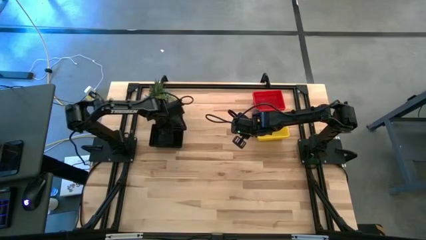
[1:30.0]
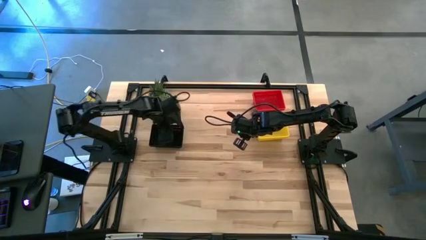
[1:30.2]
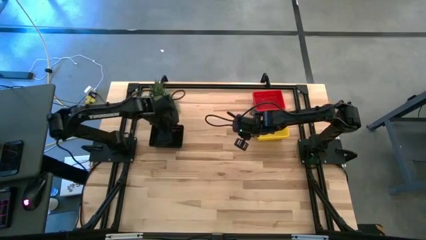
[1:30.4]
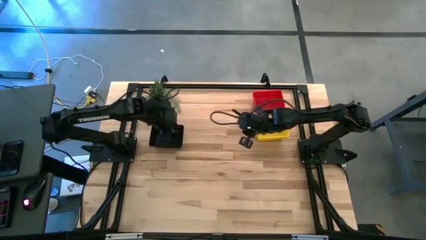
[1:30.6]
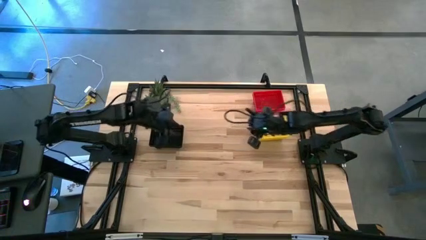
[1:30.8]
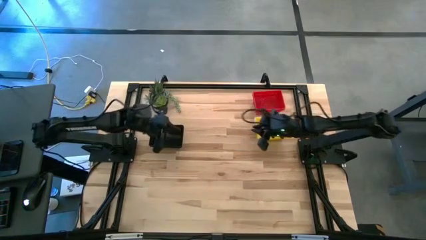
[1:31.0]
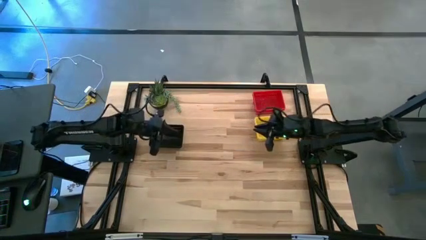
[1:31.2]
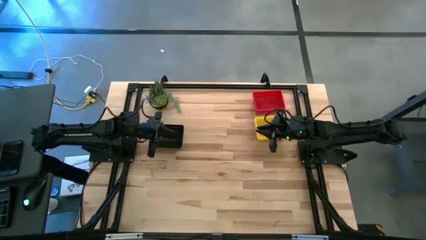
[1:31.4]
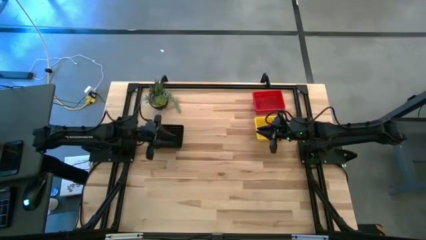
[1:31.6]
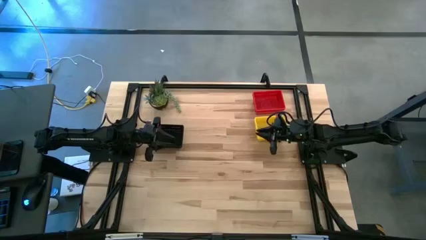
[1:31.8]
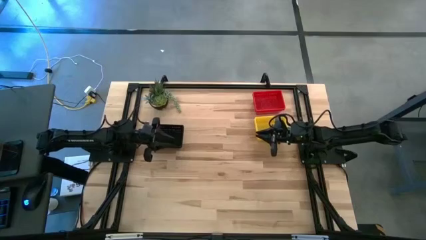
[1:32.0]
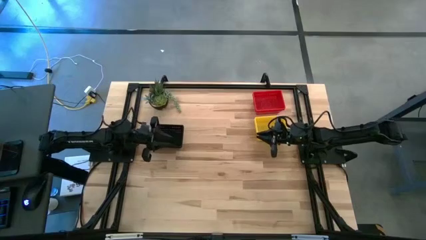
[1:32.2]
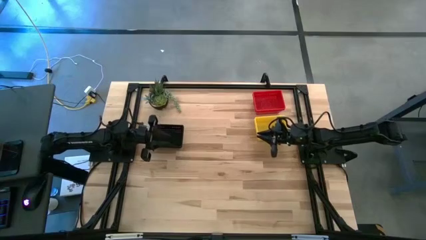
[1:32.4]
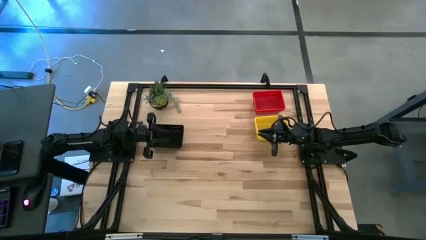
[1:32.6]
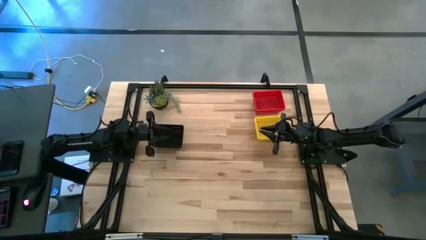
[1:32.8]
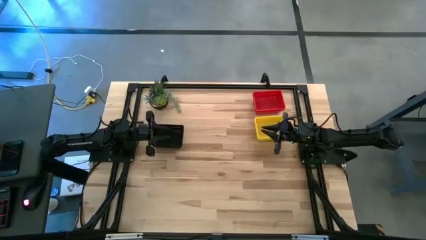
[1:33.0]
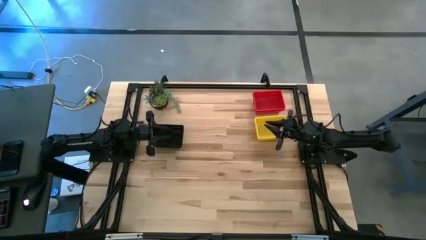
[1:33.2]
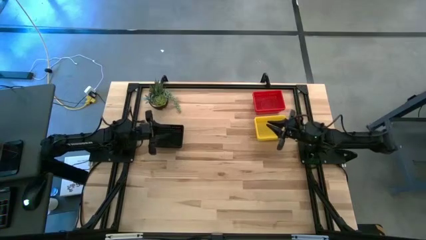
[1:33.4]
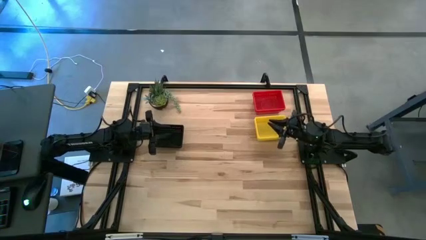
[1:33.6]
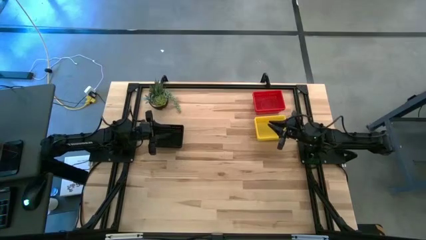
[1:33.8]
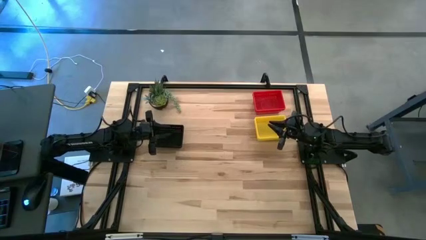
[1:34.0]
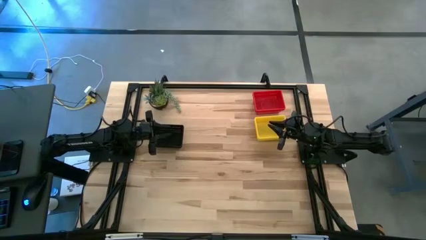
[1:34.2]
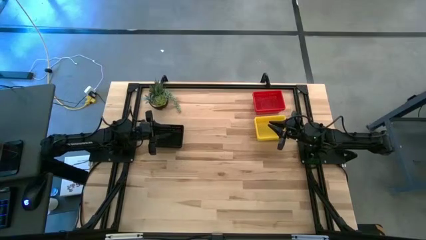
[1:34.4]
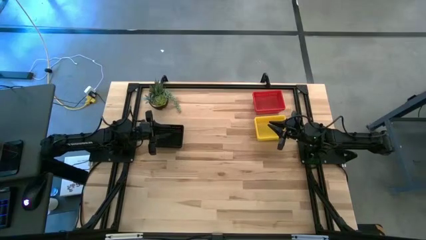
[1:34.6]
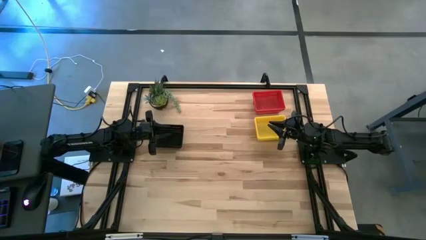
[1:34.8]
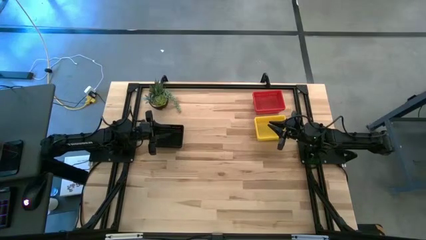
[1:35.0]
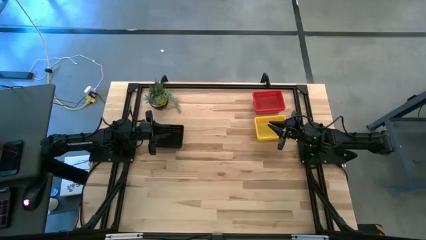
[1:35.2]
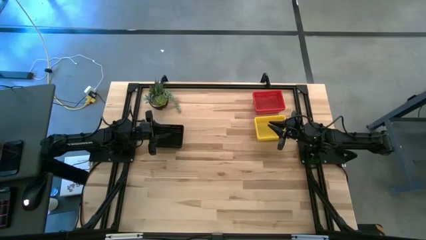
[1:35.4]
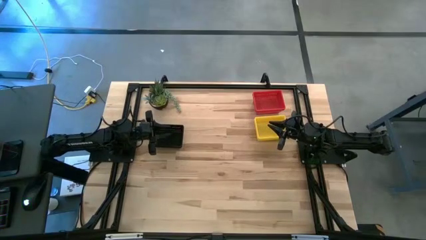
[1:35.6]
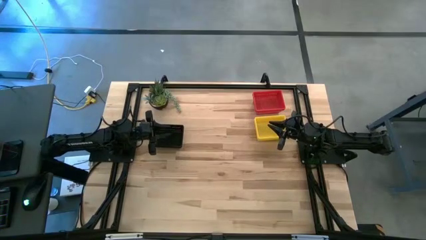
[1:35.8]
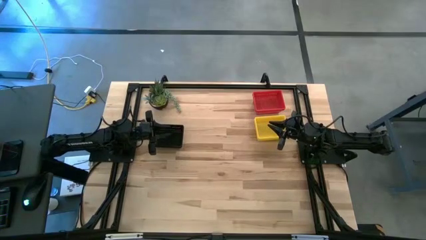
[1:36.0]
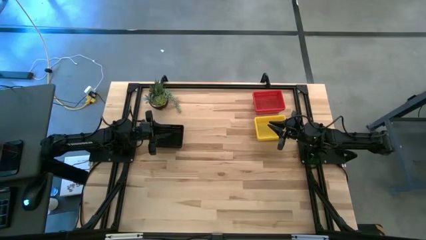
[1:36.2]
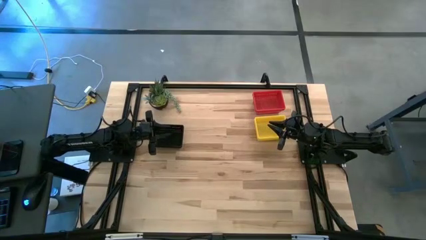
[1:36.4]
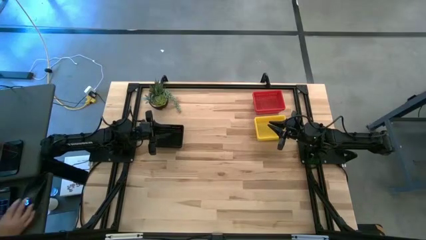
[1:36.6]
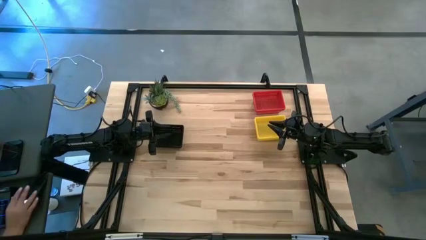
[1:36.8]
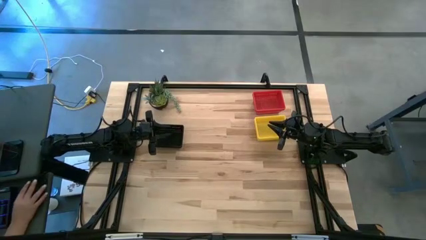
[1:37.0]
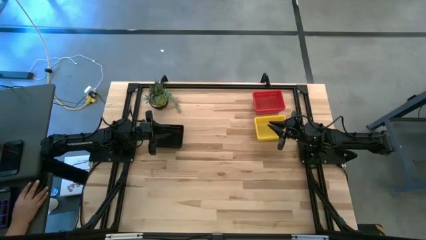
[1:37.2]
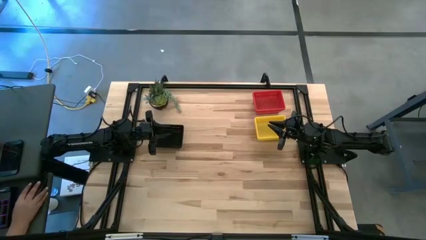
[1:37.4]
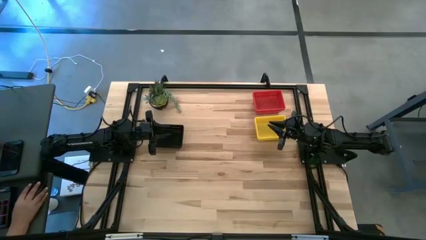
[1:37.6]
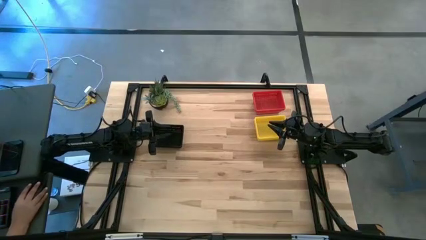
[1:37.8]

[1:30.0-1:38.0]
Return to Home Position

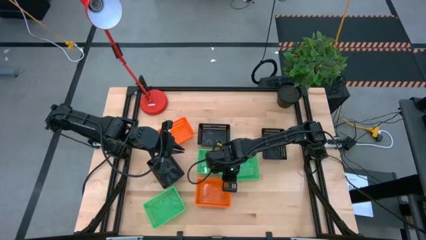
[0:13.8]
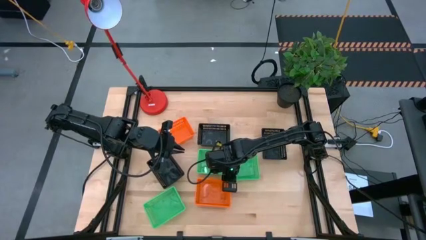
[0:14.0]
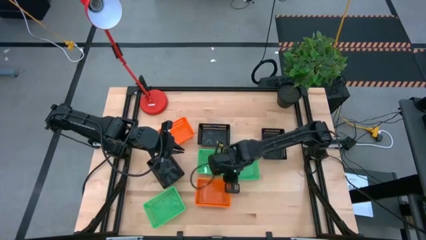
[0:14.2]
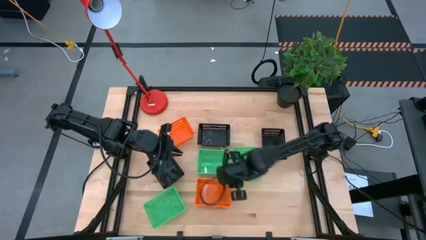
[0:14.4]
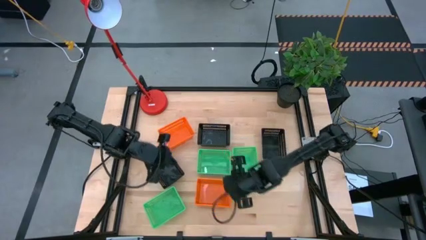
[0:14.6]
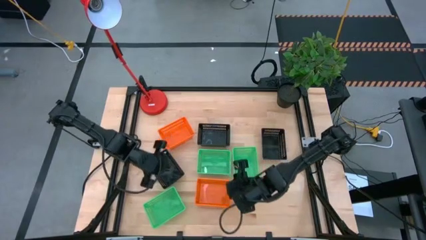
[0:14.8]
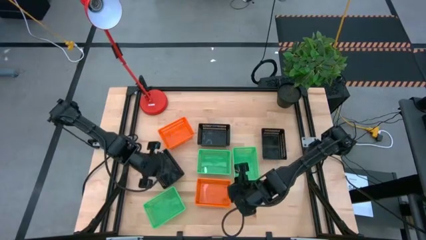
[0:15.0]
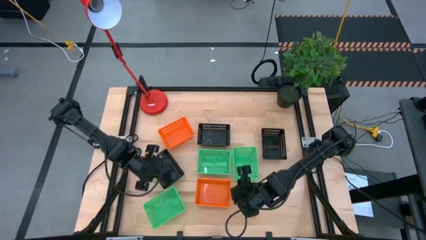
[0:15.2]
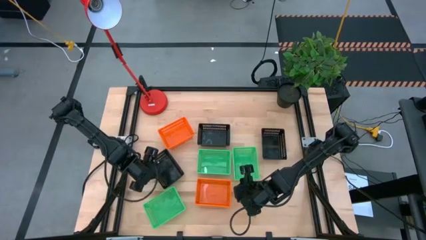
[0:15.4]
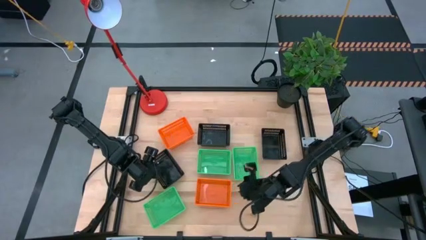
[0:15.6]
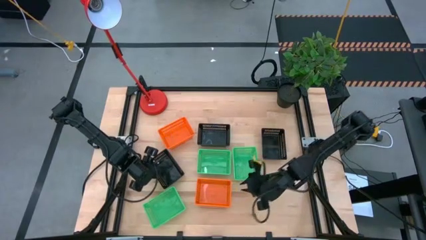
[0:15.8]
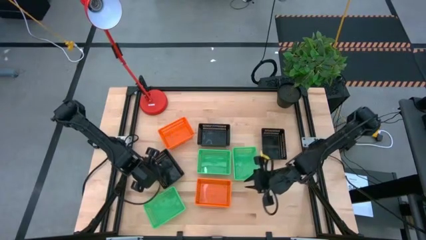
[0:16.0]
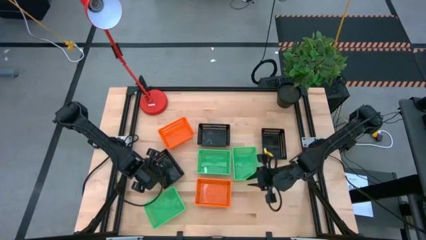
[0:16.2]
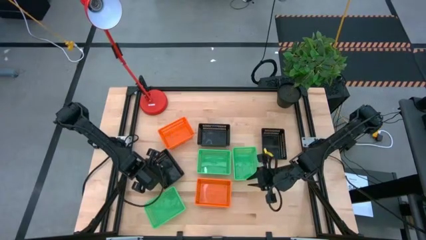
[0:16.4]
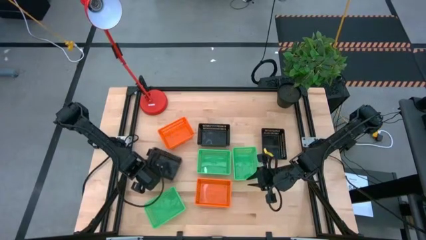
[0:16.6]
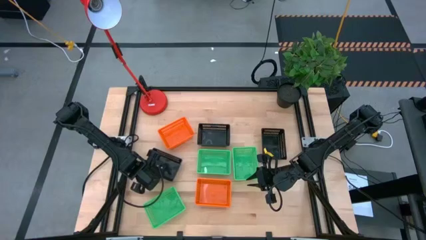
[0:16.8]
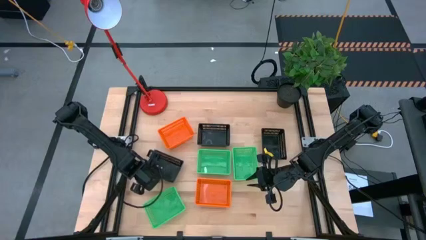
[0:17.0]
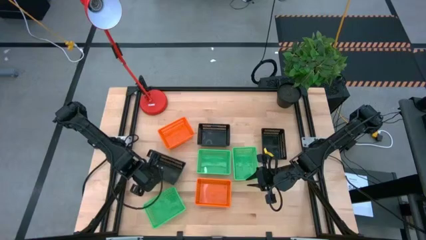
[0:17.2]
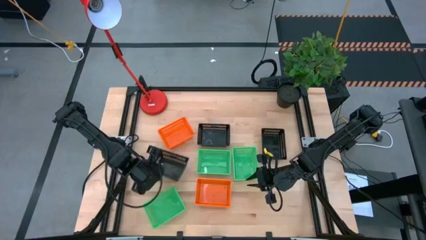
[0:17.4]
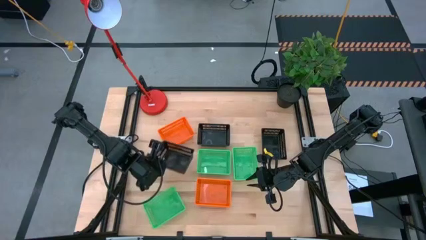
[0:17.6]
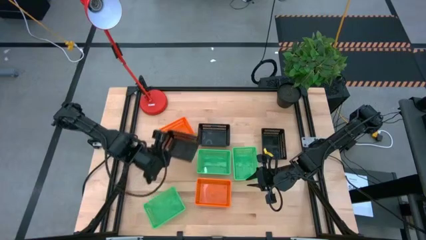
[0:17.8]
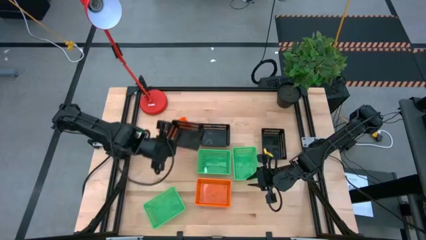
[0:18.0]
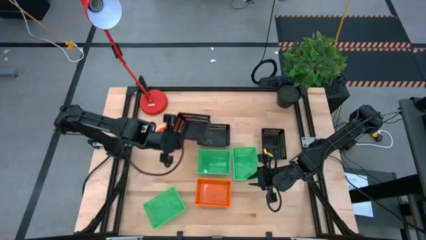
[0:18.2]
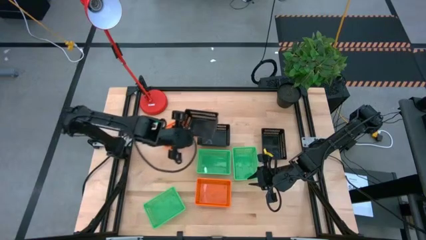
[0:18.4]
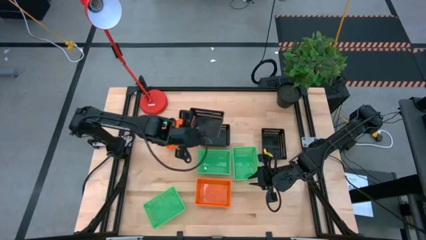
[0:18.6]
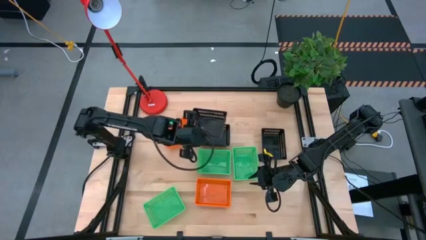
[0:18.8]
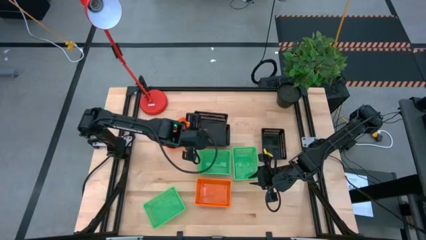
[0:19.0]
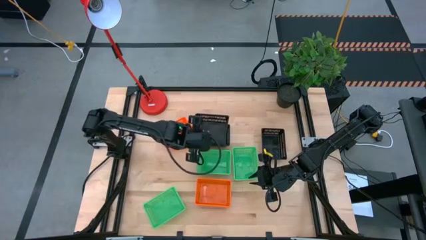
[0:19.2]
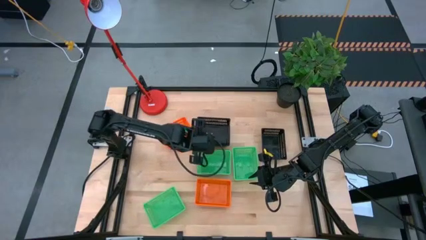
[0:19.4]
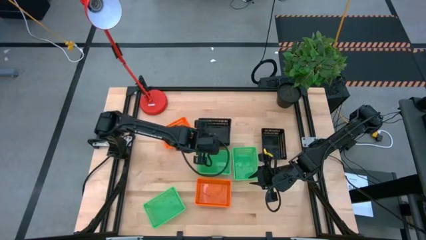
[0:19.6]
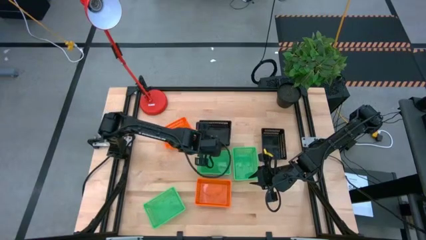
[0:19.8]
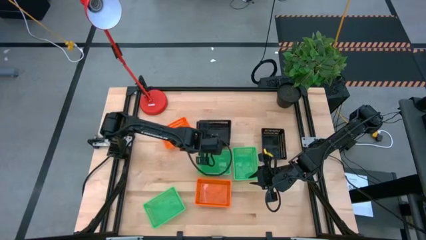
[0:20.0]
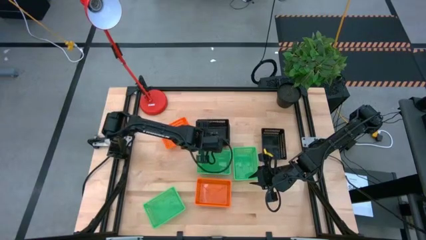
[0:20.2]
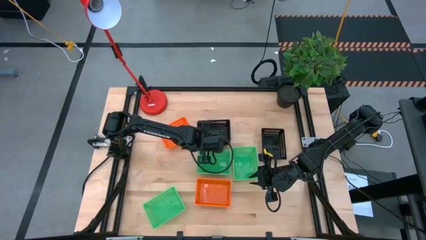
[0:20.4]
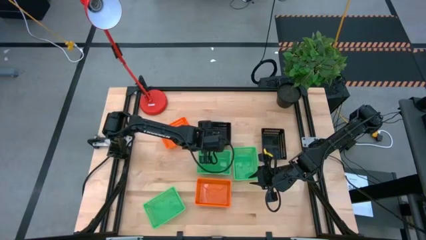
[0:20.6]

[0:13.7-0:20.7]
Stack the bottom black bin on top of the left black bin
